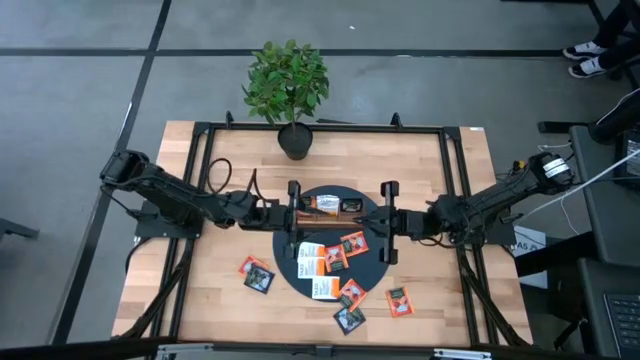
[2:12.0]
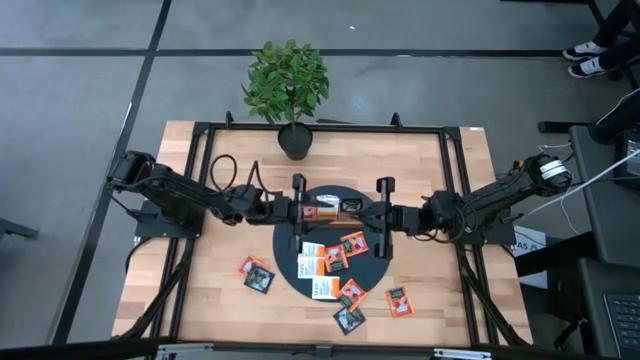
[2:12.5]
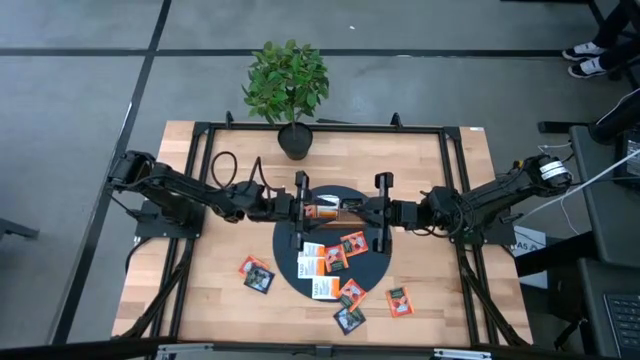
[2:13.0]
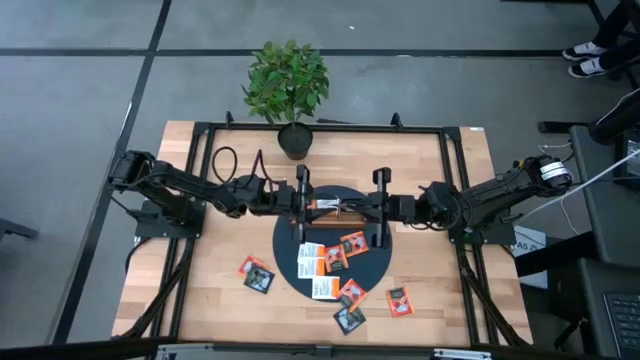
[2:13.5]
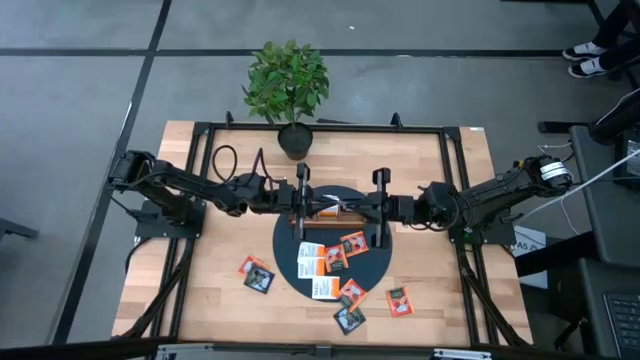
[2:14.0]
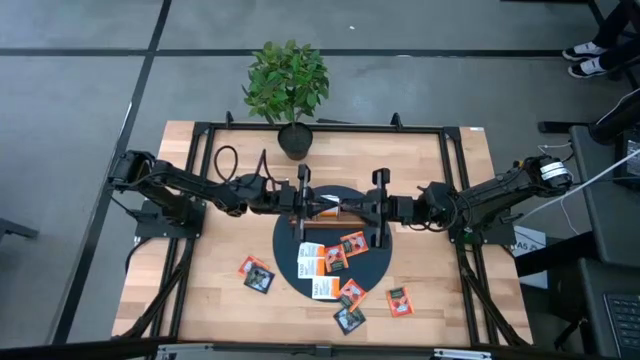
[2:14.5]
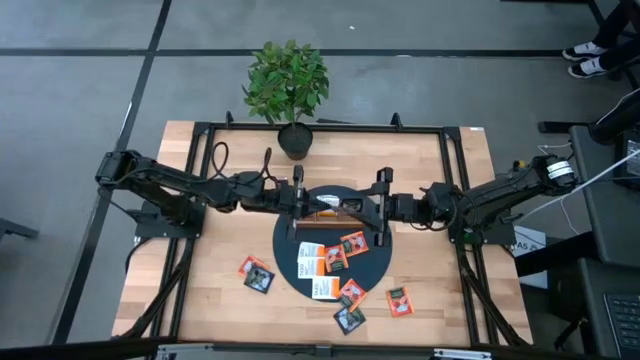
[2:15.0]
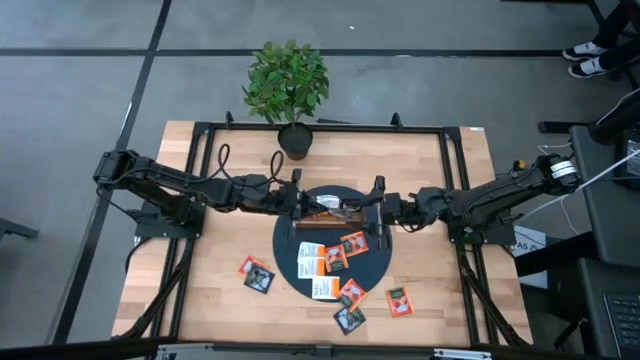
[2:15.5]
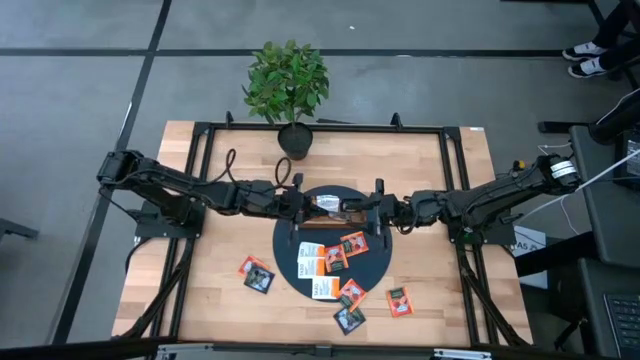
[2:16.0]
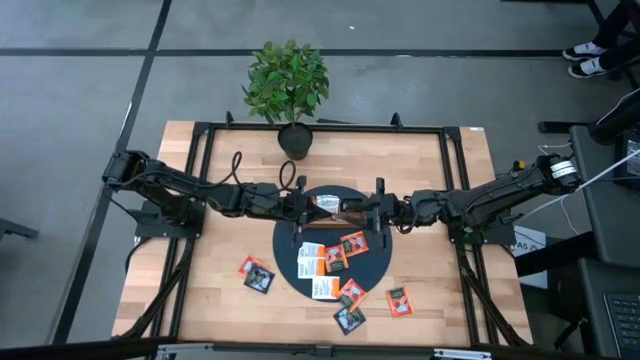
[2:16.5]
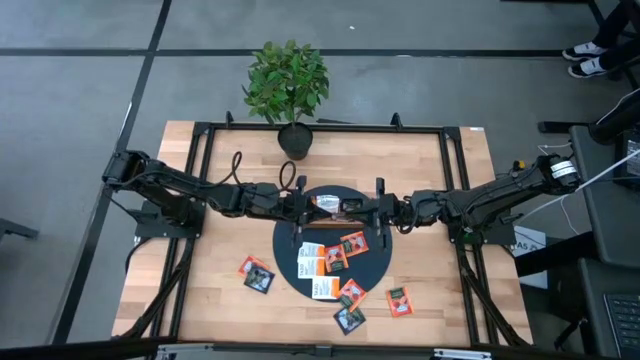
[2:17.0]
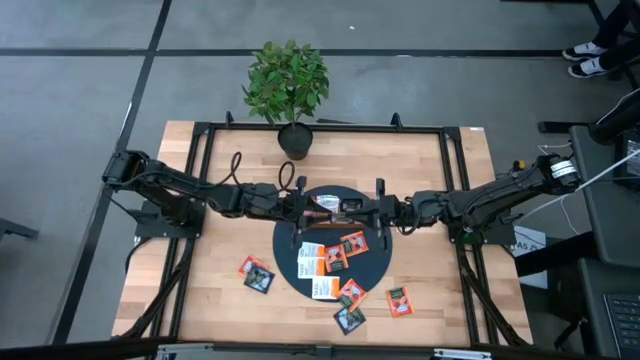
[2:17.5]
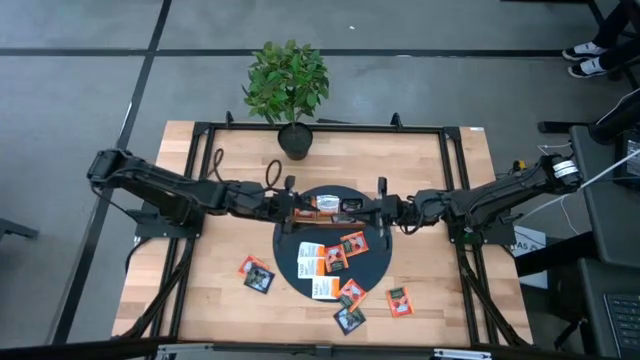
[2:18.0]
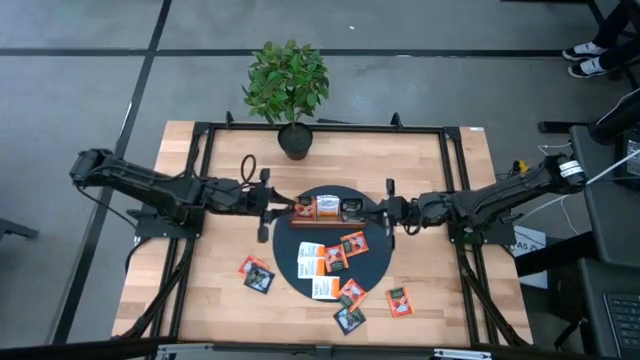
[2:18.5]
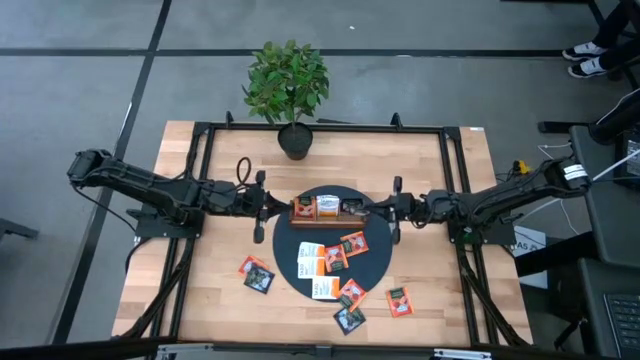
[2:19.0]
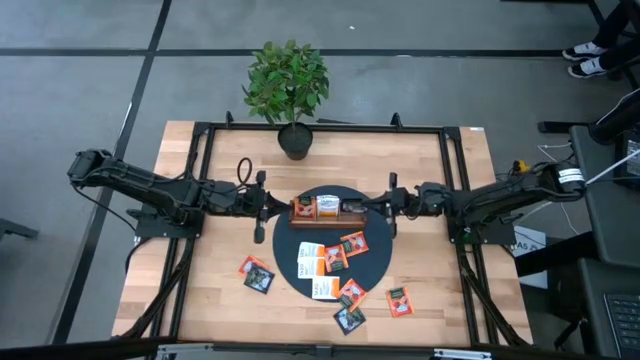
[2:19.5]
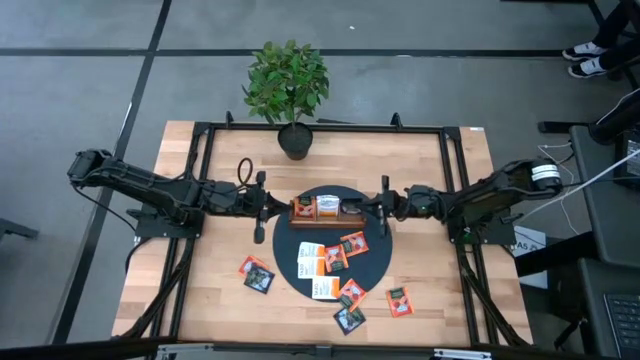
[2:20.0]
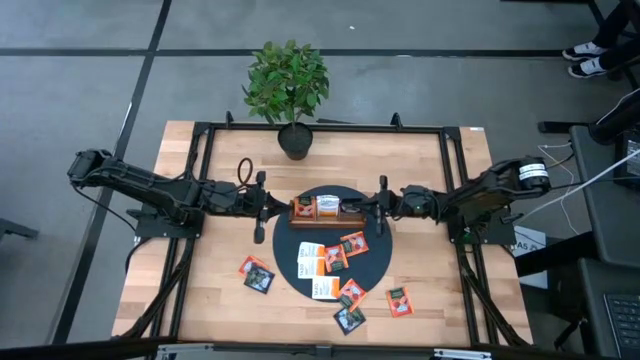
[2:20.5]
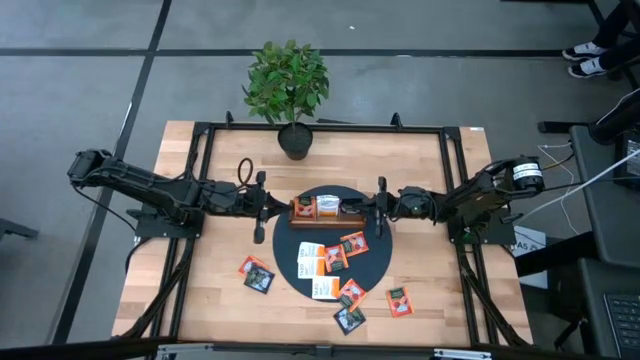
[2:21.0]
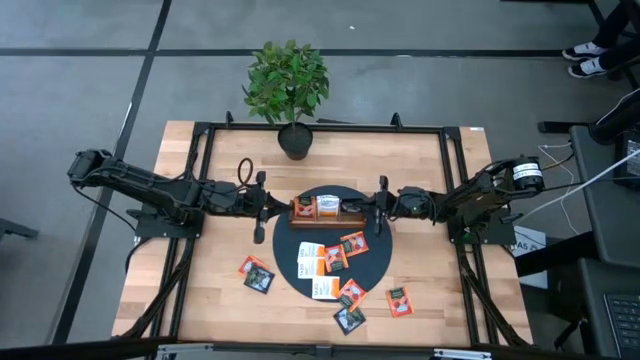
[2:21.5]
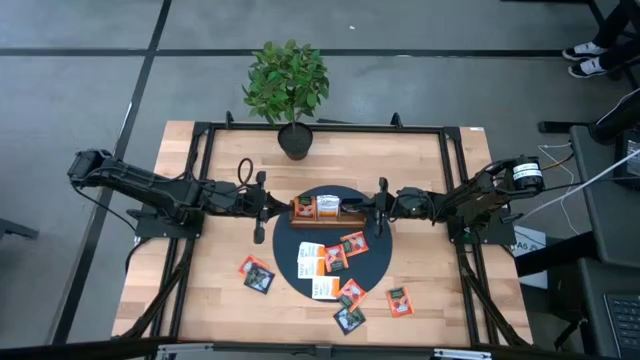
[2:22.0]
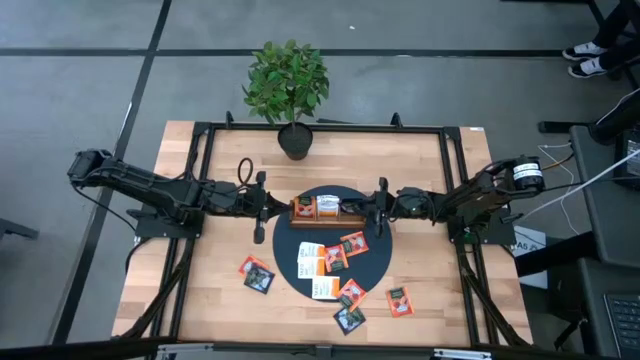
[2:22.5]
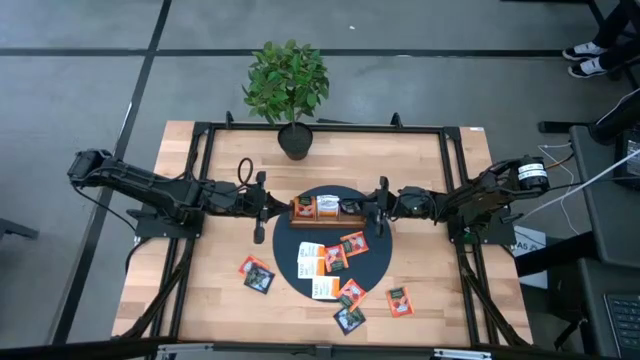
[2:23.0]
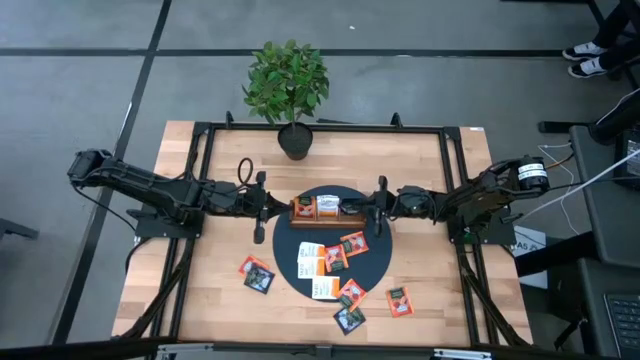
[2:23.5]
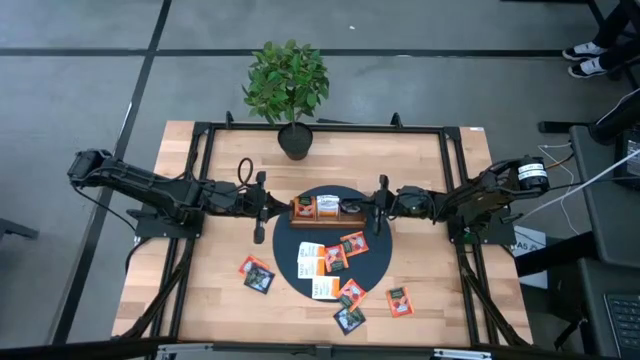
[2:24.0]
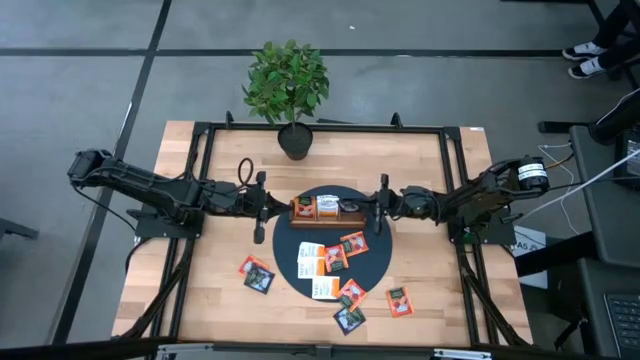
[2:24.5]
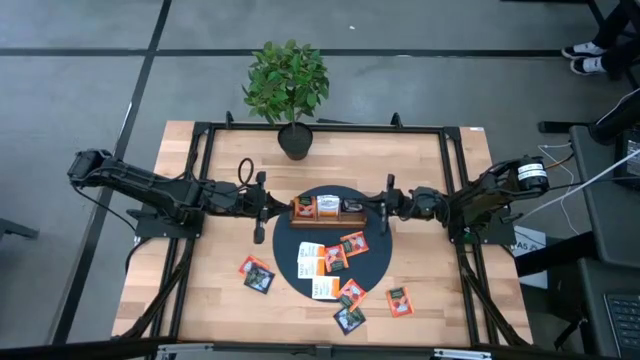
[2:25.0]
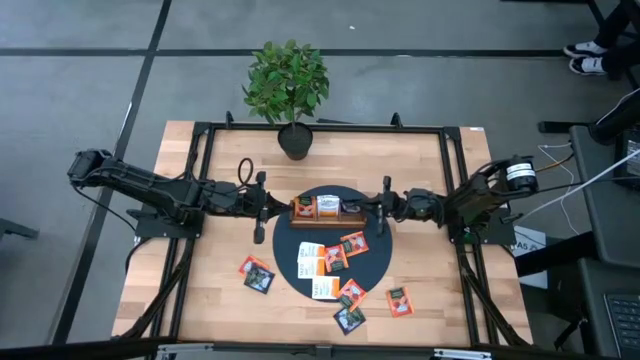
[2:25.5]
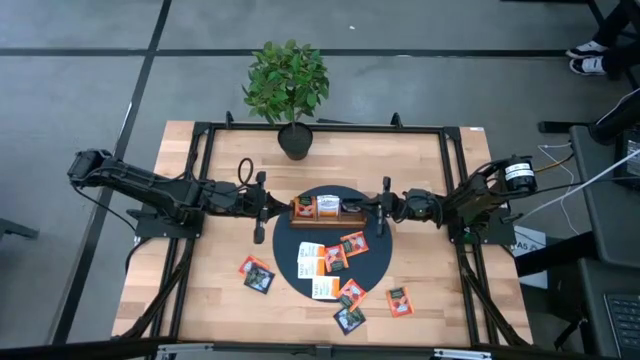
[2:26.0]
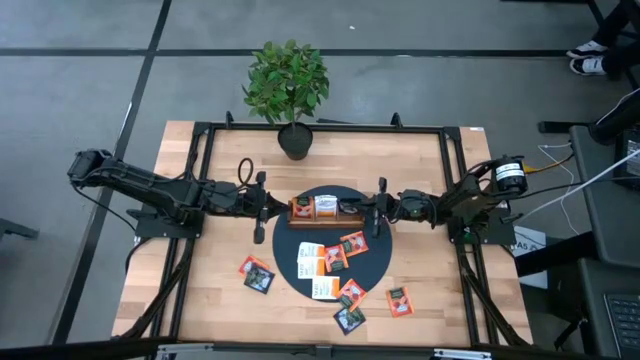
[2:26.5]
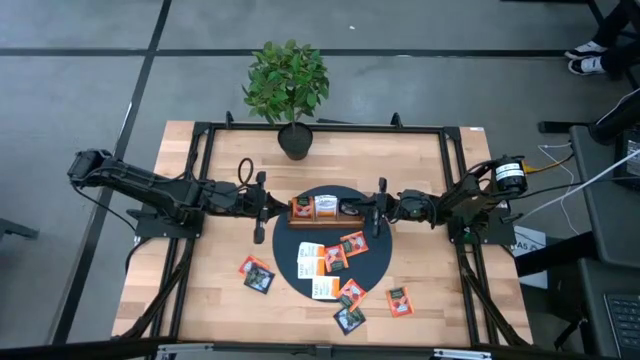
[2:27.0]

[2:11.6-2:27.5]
Task: Pick & Place Tea
Put the violet tea bag into the right side of the wooden organizer

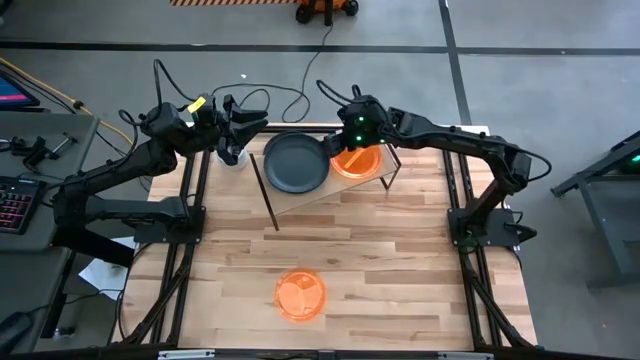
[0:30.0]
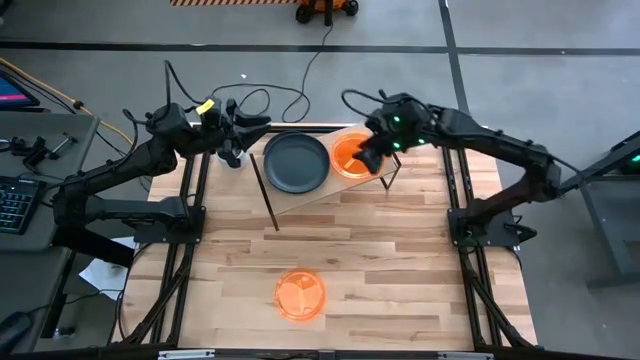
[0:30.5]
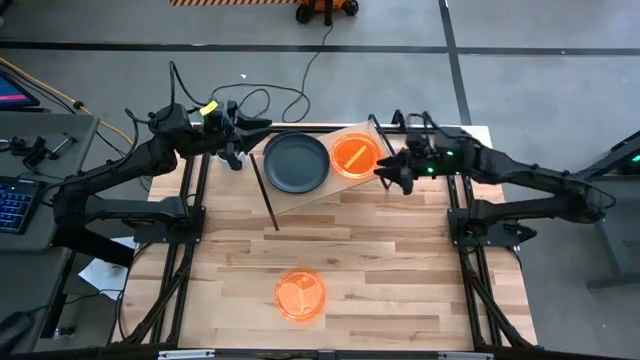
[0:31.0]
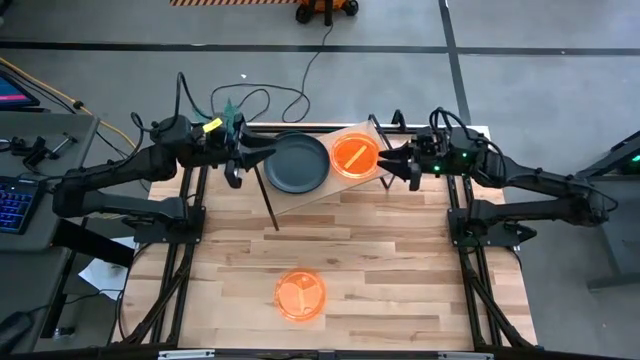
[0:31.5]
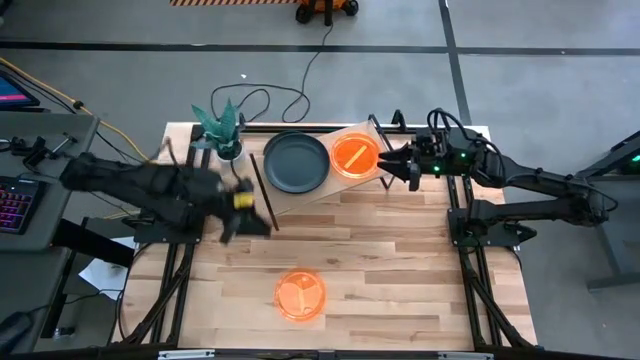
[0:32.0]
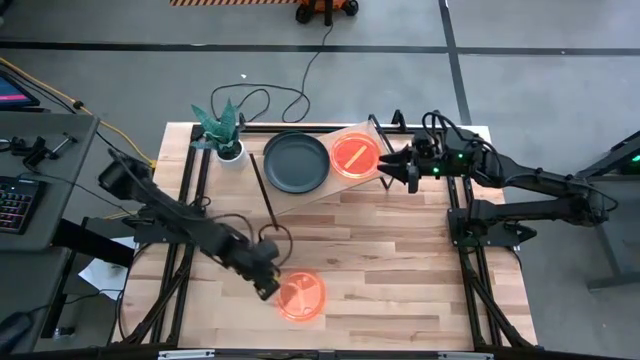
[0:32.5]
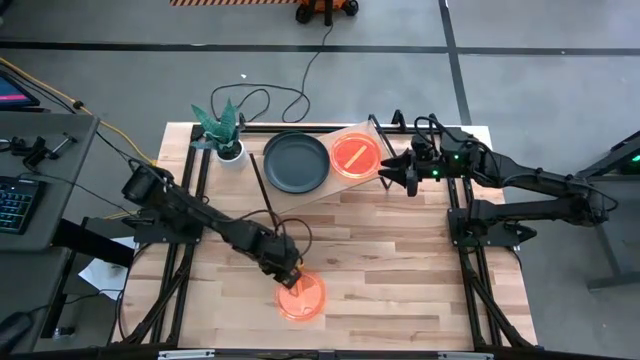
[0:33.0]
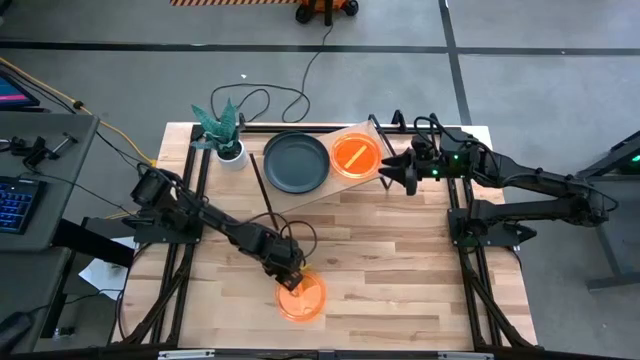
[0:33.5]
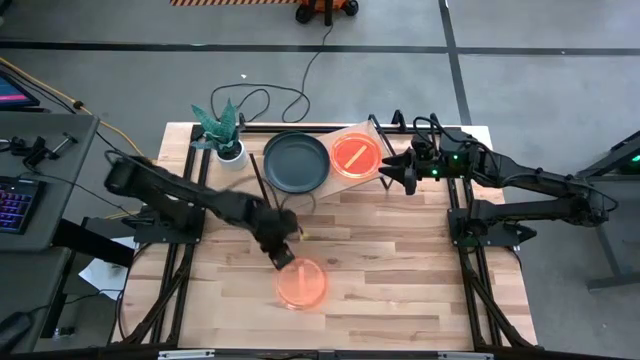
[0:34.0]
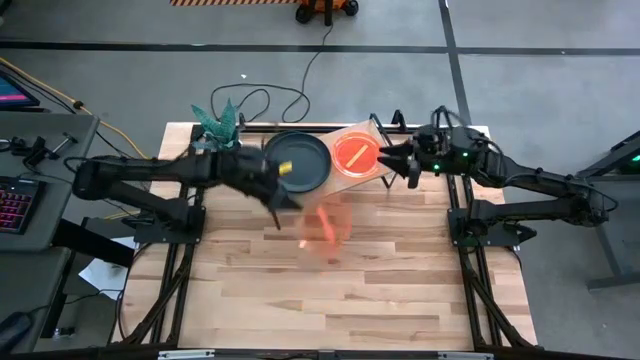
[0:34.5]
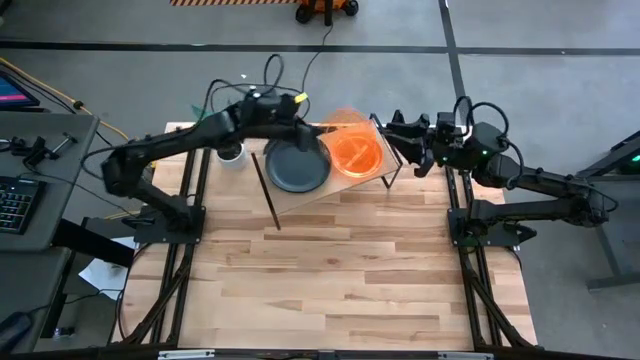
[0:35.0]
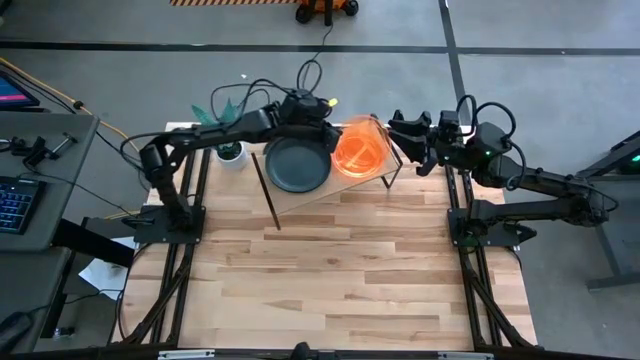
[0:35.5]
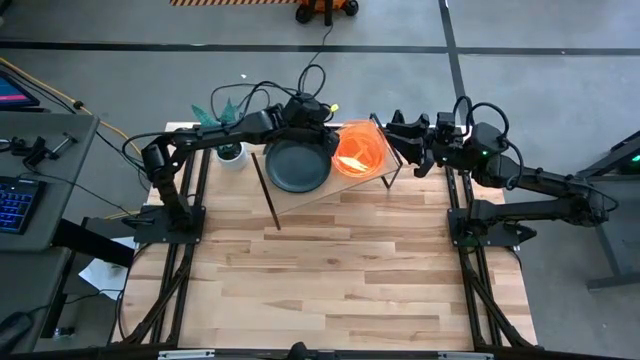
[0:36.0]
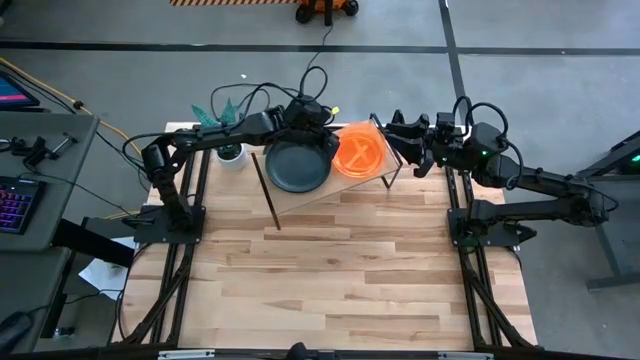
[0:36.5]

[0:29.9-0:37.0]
Task: Place and stack plates onto a shelf
Stack the orange plate on top of the orange plate on the shelf
